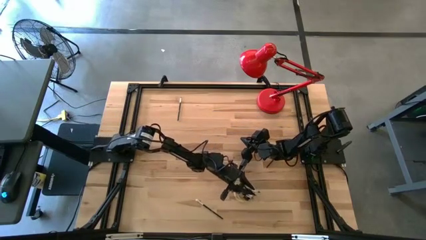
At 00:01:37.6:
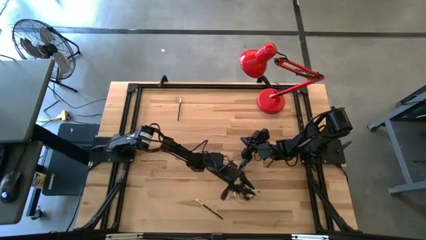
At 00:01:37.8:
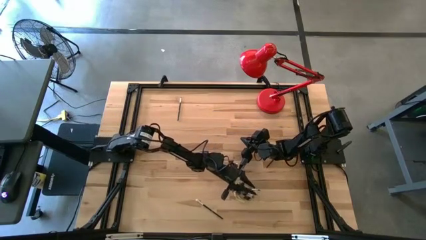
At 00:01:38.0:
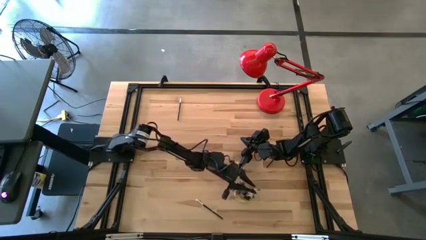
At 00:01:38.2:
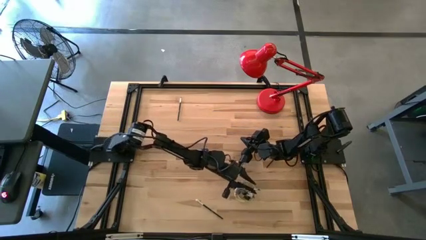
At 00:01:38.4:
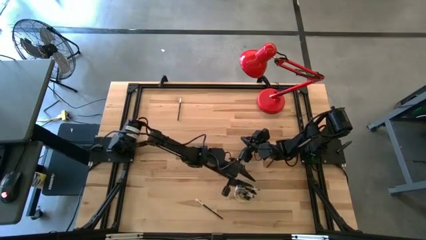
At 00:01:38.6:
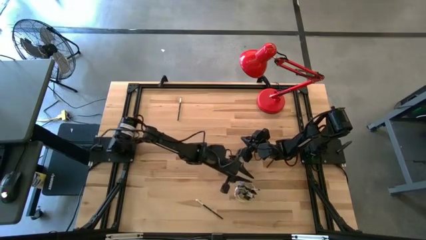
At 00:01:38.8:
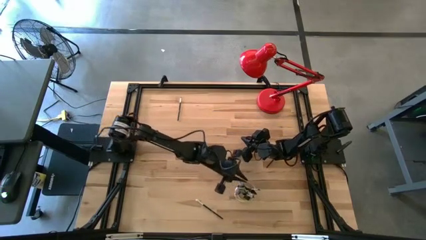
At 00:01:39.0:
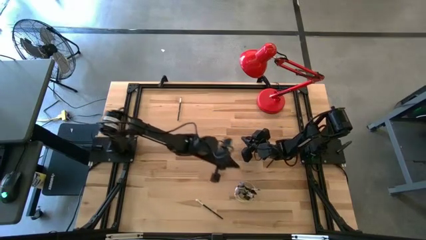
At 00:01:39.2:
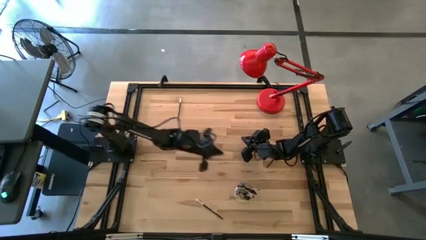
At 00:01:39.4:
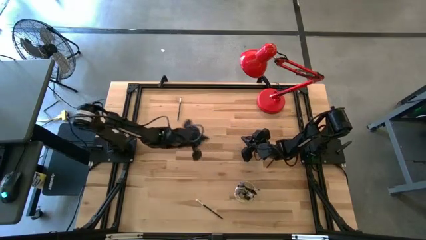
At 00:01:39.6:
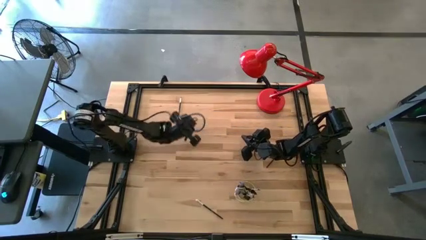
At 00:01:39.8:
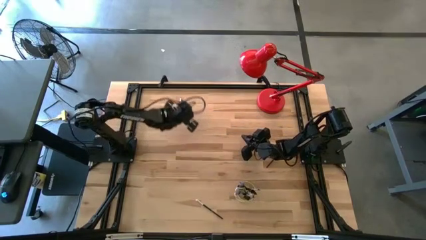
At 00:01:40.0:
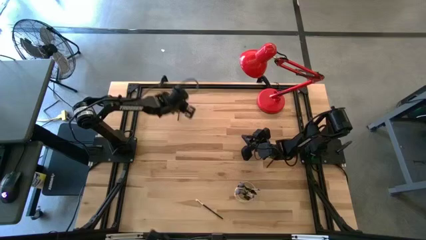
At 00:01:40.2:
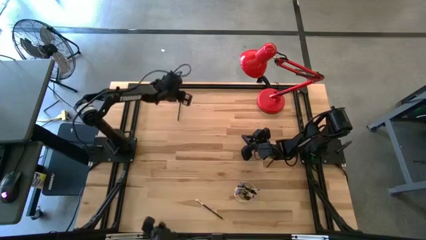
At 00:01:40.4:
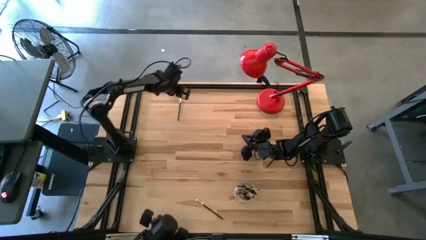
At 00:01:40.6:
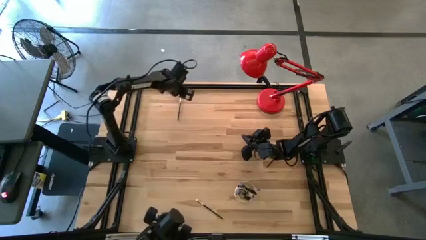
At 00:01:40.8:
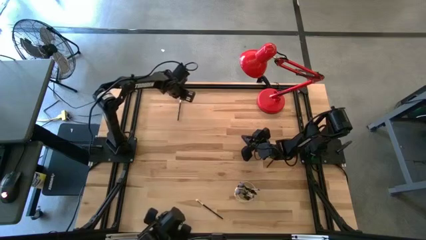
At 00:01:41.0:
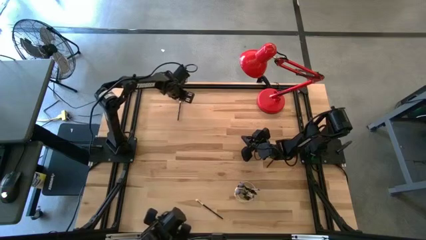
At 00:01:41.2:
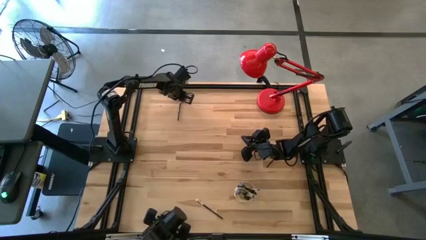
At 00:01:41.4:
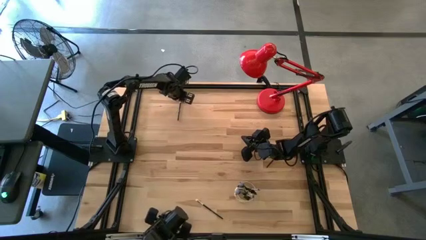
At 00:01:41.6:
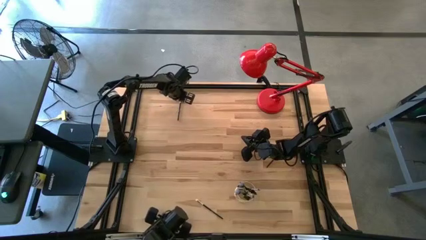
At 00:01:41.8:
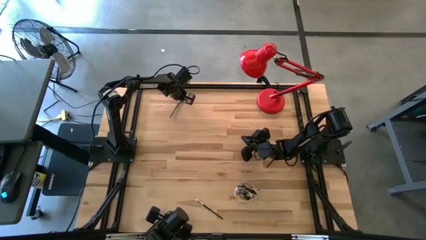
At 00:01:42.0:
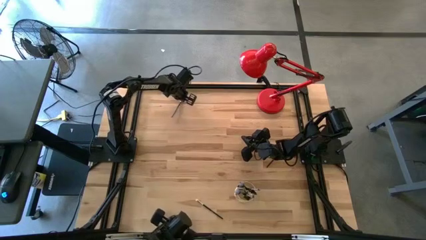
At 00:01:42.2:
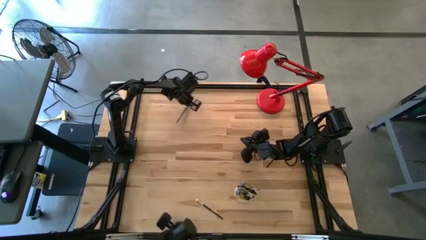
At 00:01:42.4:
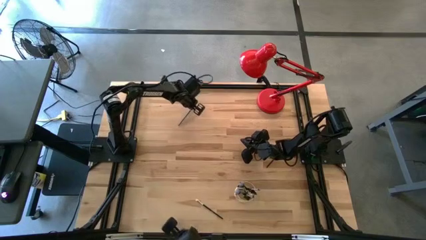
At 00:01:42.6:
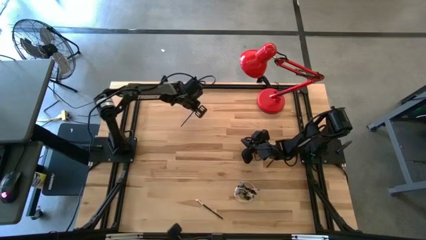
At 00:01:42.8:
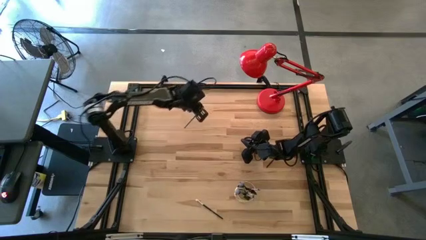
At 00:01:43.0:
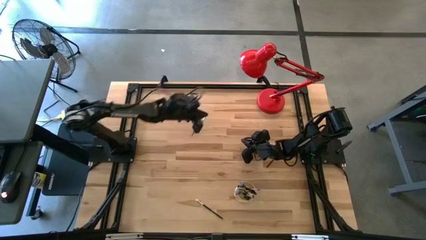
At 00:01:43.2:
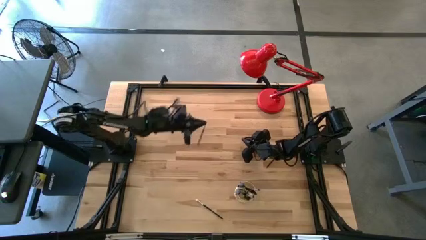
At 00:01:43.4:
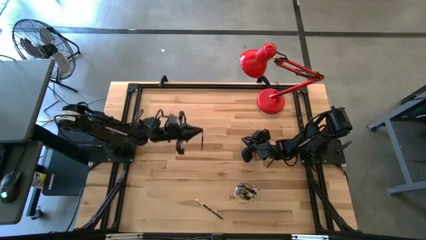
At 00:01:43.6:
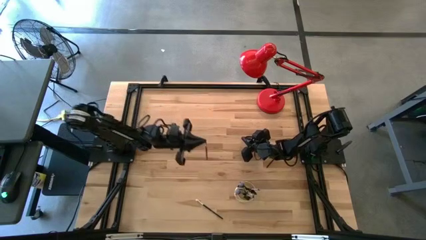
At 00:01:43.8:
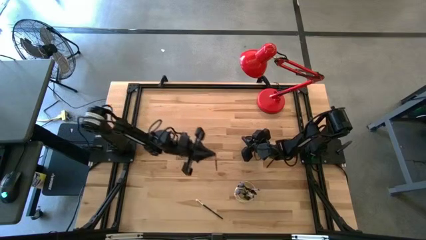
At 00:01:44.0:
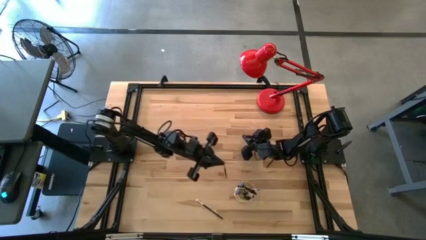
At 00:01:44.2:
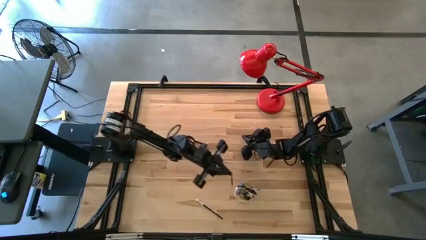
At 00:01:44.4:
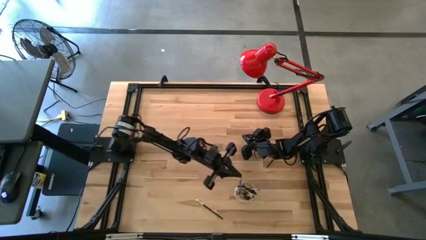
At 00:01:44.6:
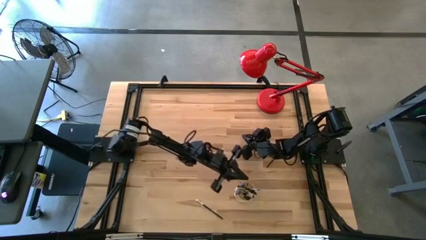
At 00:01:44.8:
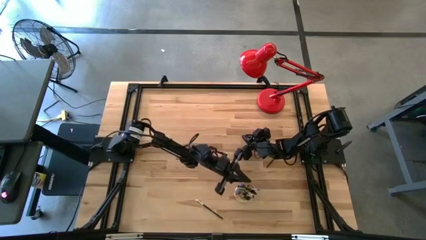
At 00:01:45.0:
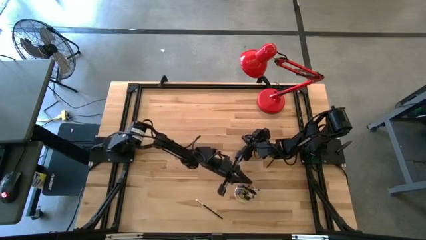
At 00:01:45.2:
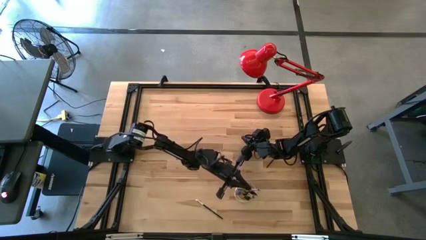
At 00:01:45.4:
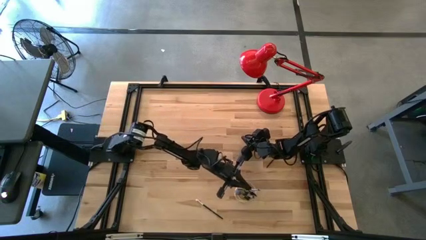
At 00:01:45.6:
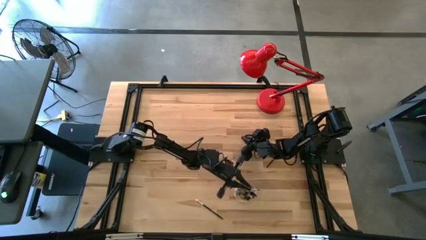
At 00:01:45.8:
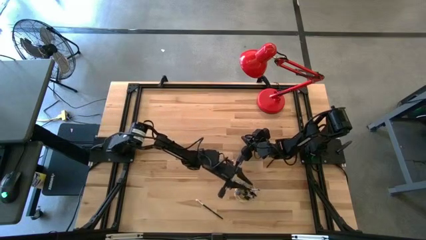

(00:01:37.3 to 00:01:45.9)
Task: Pick & Place Makeup Brushes
Put the eyeshadow brush into the gold makeup holder

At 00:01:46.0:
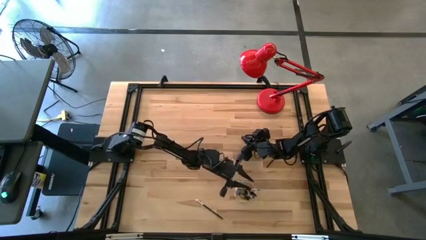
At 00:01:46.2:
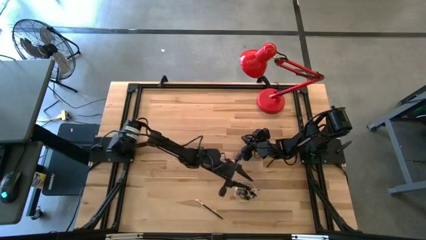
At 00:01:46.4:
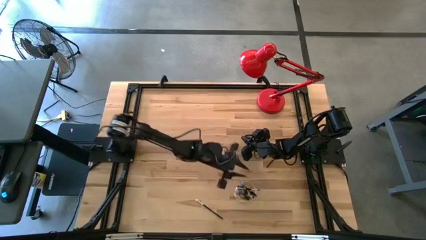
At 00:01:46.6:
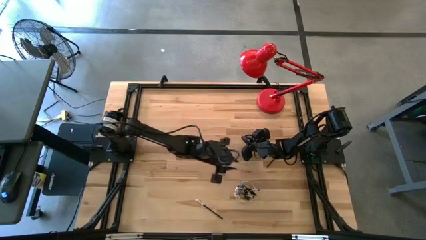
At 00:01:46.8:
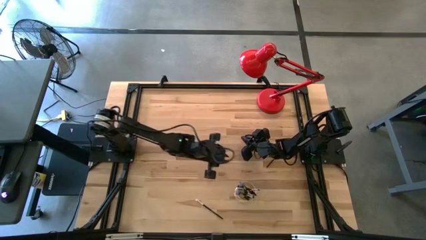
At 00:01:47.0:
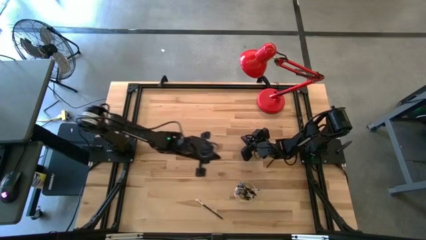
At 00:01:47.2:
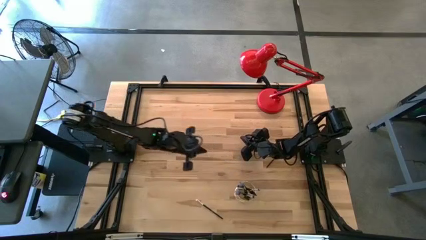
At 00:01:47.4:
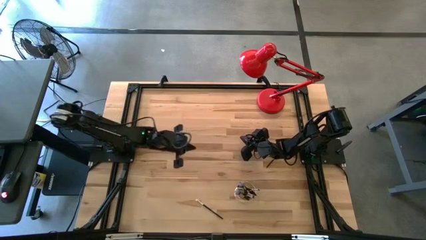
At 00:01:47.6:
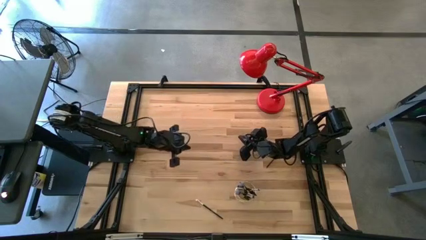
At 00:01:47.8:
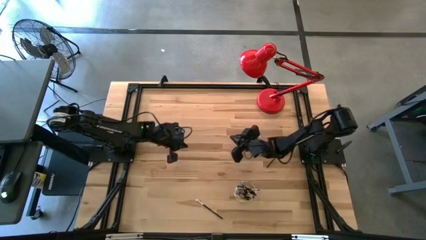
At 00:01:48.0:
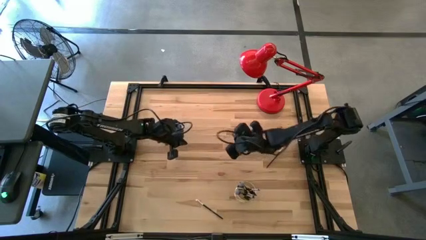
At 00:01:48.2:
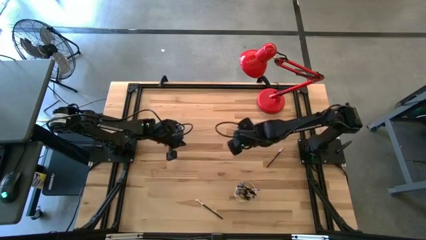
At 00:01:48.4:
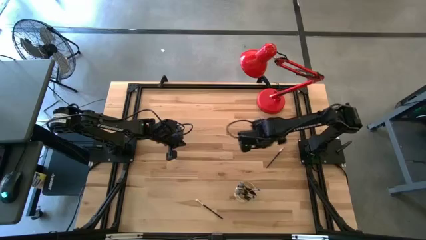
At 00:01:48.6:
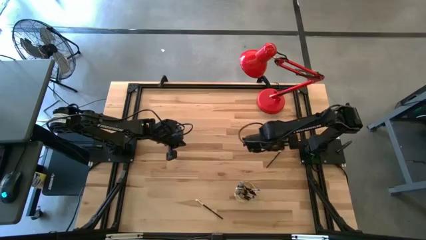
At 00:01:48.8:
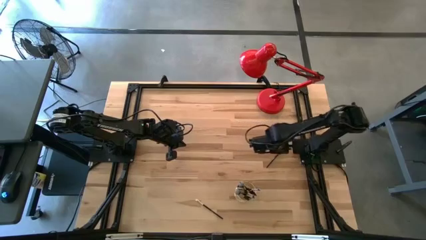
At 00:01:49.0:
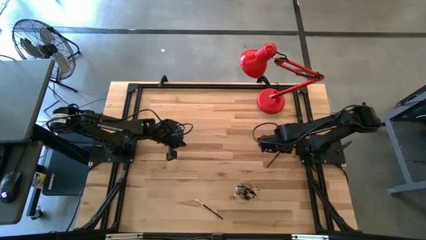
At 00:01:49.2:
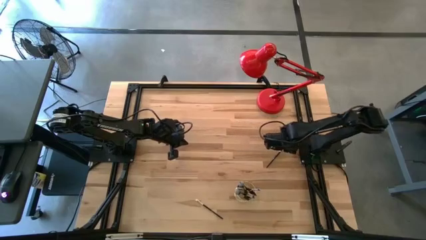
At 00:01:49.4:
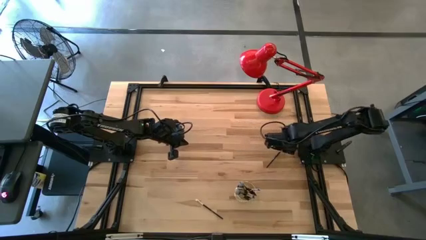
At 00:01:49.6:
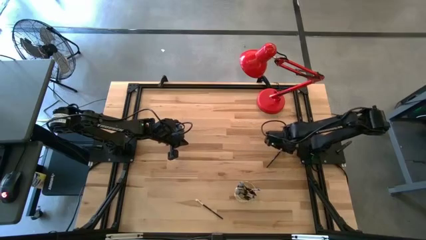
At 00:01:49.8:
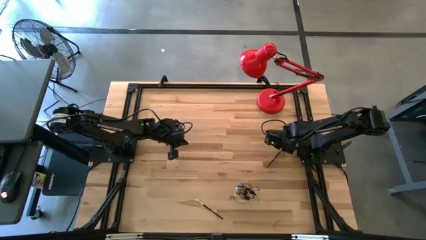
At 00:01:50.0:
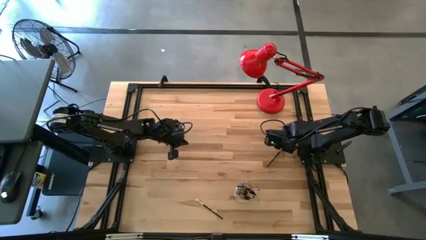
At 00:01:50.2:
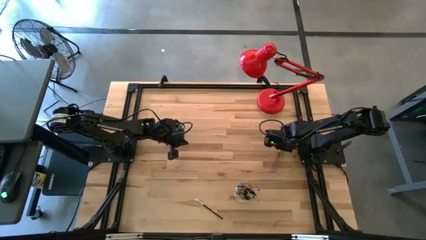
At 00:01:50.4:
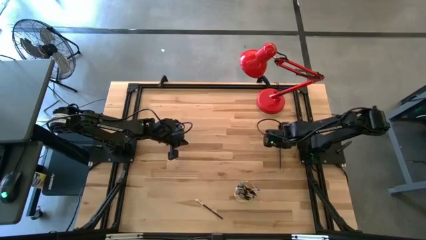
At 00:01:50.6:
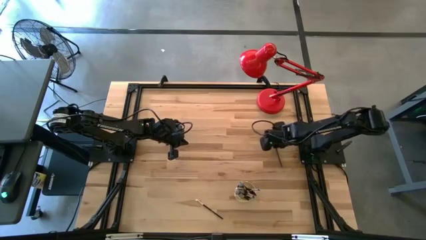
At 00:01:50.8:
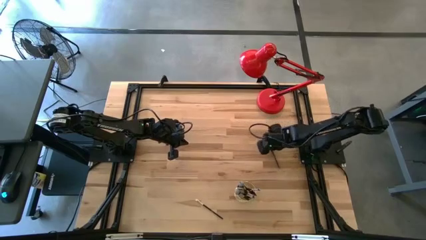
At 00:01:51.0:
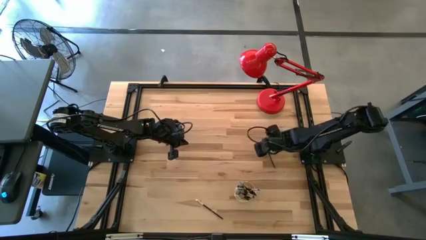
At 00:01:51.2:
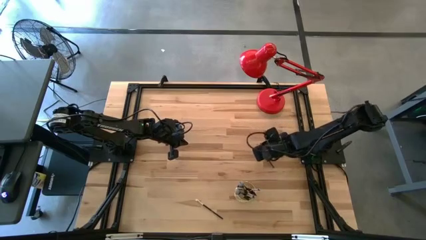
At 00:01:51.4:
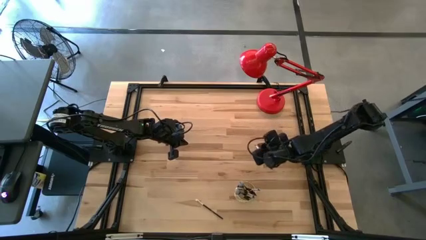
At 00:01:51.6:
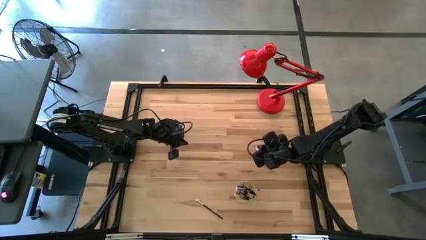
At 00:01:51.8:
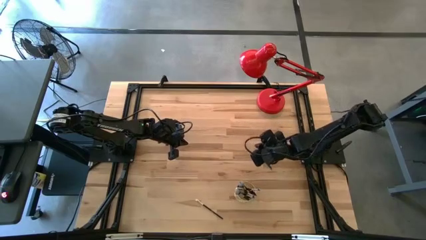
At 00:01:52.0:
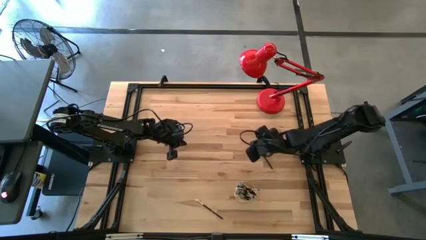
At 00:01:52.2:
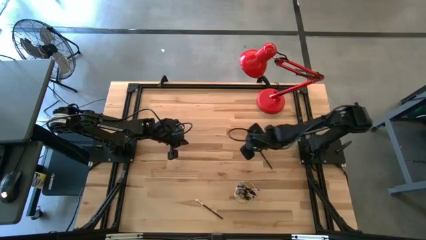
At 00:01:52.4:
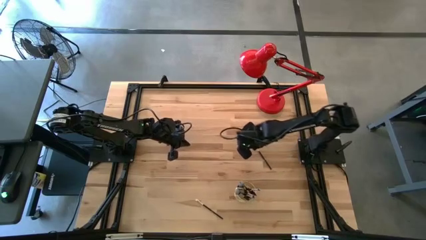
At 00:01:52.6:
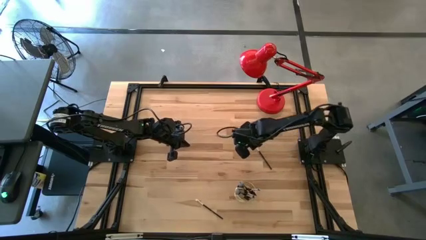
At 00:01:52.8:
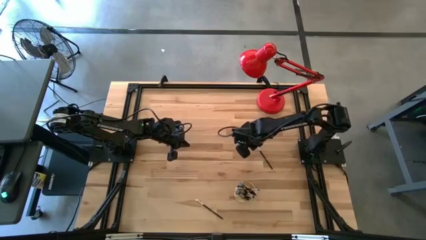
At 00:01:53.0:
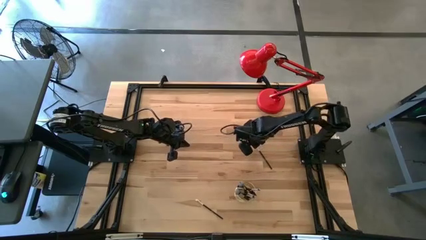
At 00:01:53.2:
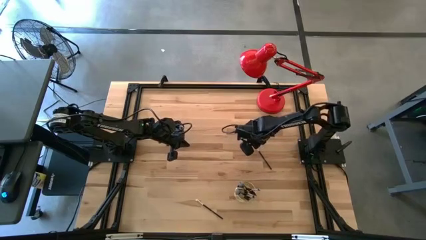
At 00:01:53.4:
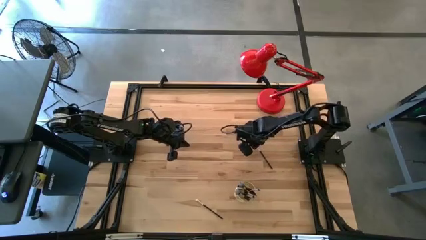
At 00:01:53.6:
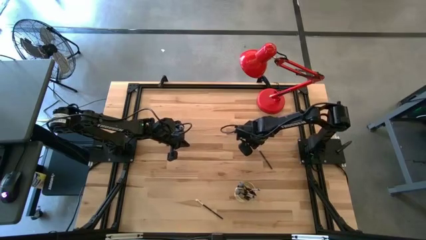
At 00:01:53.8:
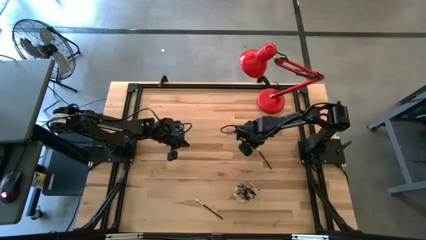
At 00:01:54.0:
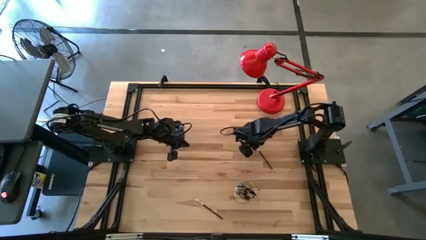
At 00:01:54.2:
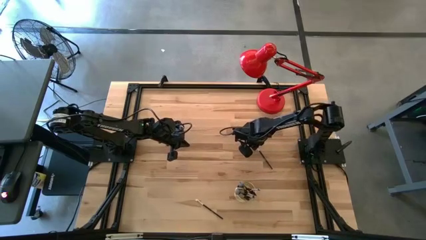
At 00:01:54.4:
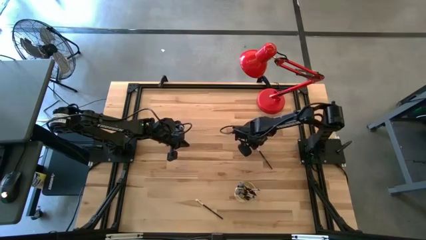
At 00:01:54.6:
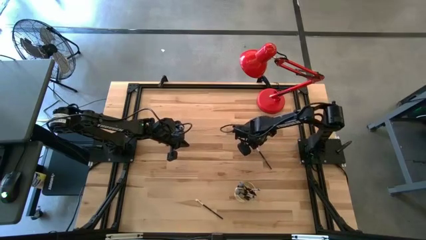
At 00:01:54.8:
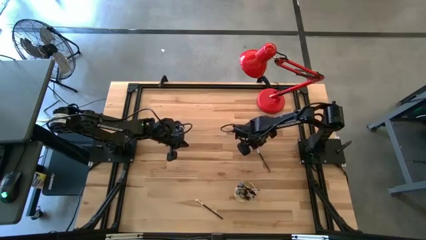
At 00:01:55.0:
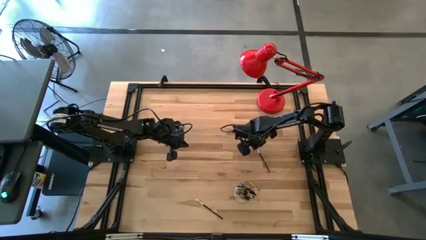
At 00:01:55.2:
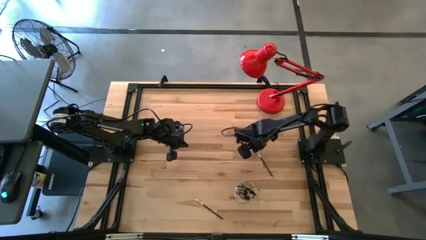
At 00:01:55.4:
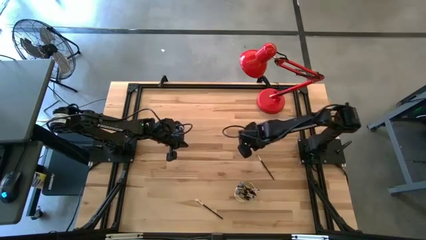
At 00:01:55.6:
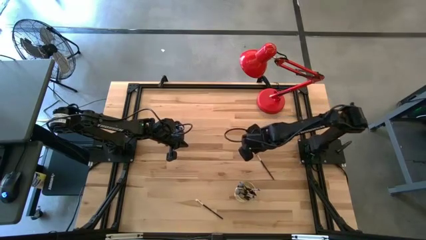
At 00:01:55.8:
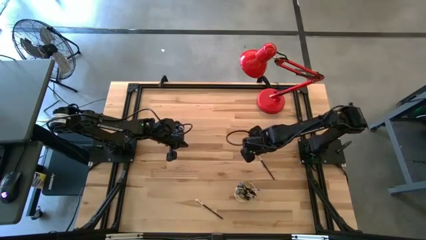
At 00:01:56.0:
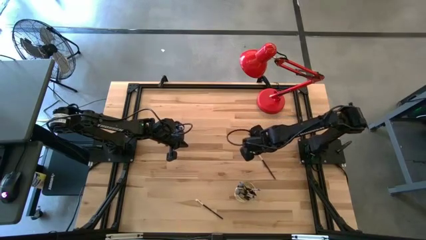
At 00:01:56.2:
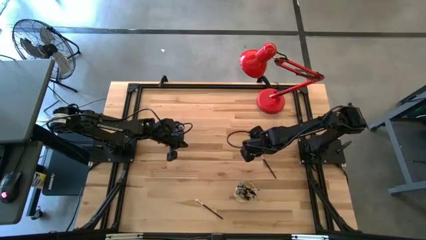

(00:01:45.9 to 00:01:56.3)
Put the eyeshadow brush into the gold makeup holder
